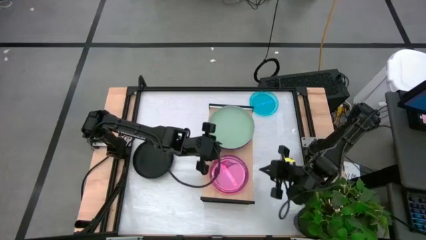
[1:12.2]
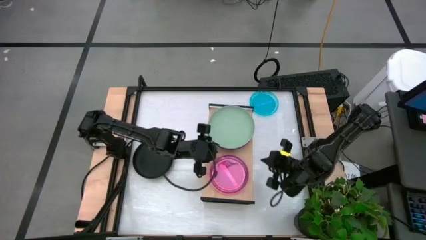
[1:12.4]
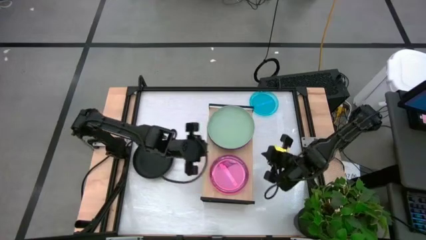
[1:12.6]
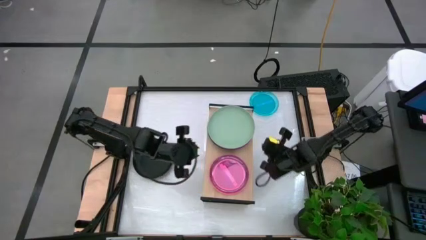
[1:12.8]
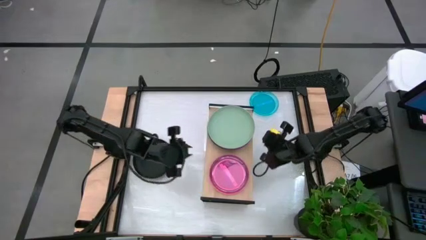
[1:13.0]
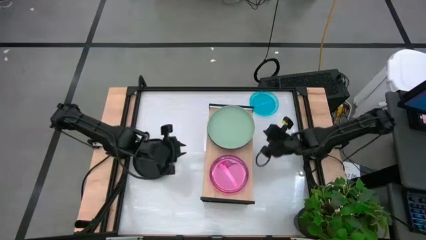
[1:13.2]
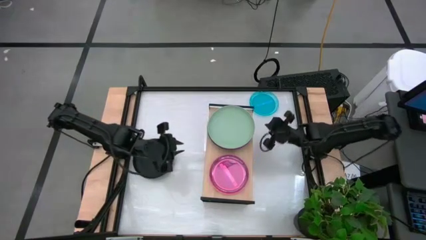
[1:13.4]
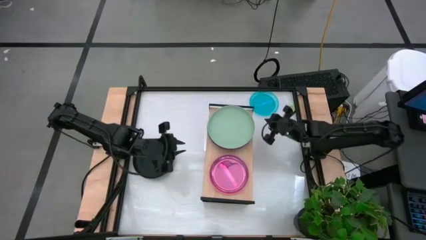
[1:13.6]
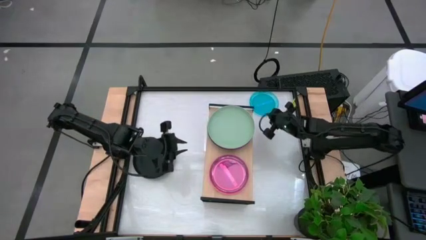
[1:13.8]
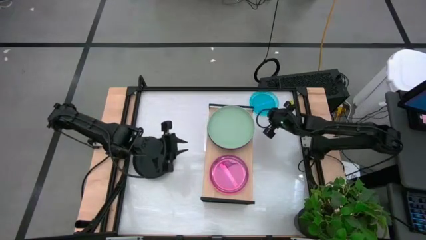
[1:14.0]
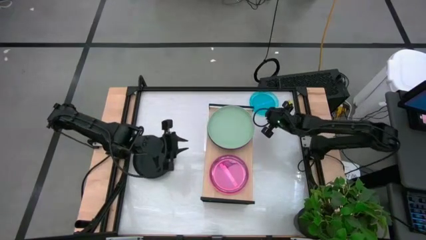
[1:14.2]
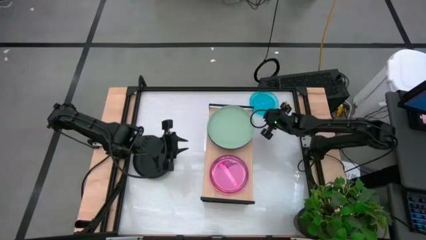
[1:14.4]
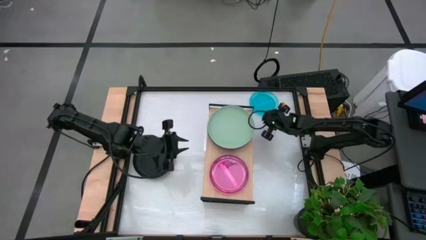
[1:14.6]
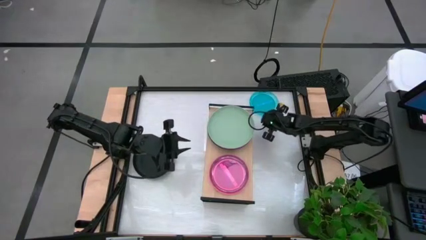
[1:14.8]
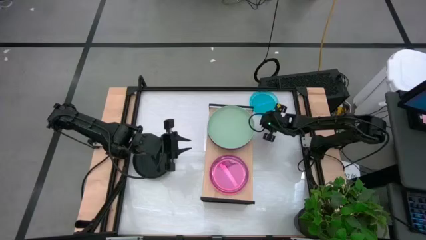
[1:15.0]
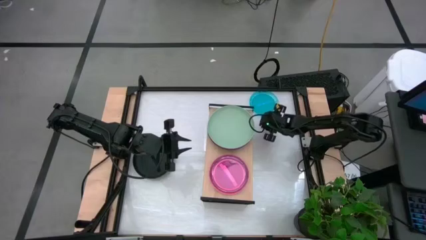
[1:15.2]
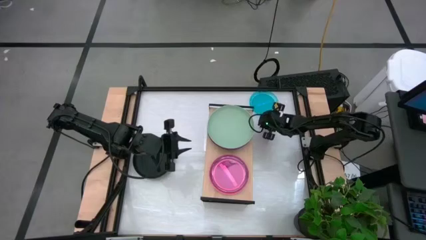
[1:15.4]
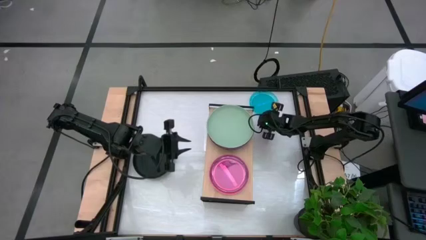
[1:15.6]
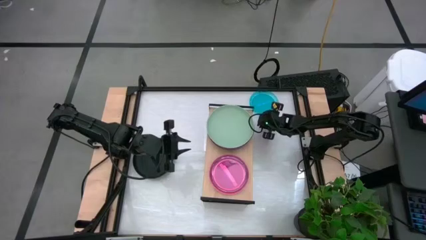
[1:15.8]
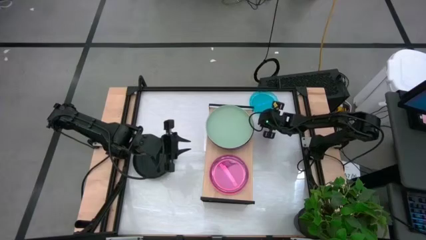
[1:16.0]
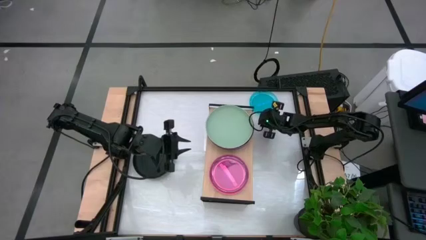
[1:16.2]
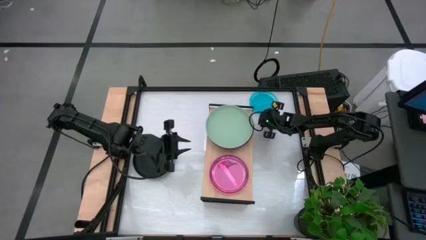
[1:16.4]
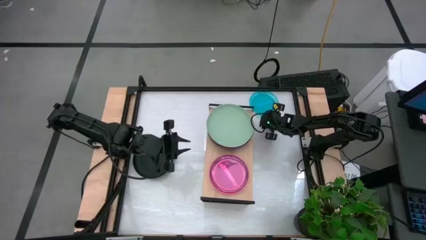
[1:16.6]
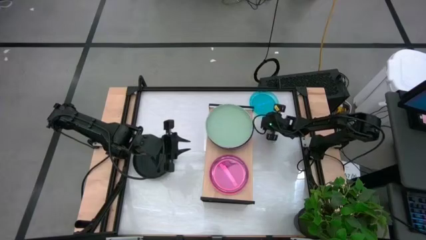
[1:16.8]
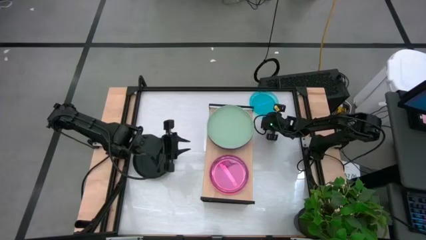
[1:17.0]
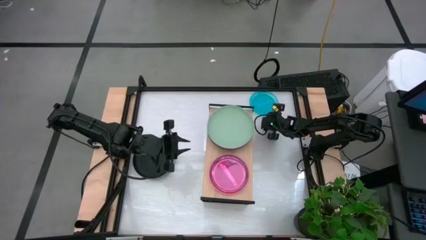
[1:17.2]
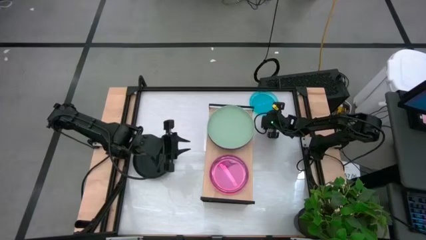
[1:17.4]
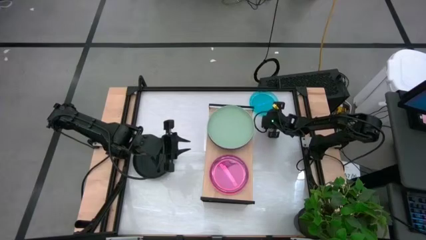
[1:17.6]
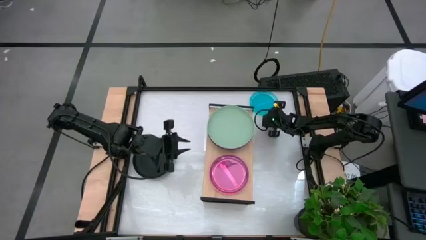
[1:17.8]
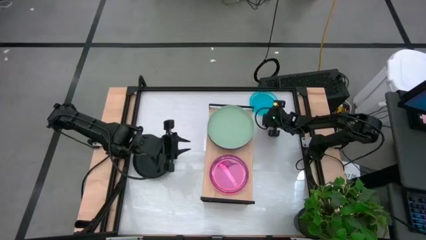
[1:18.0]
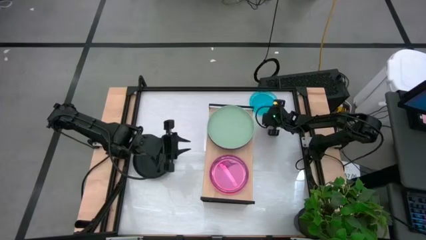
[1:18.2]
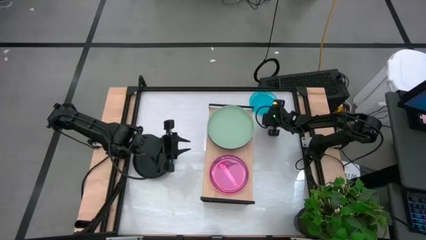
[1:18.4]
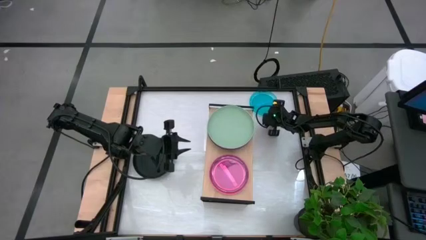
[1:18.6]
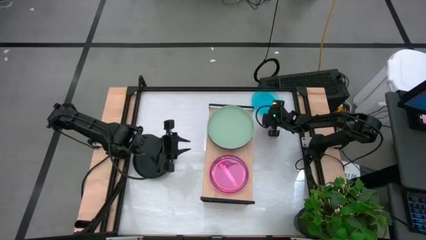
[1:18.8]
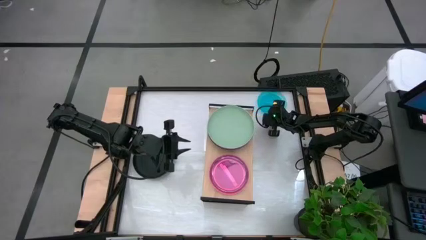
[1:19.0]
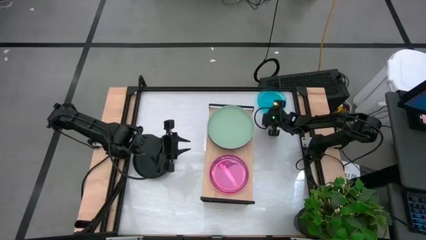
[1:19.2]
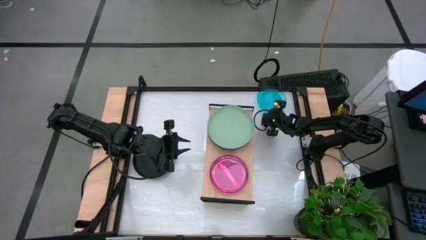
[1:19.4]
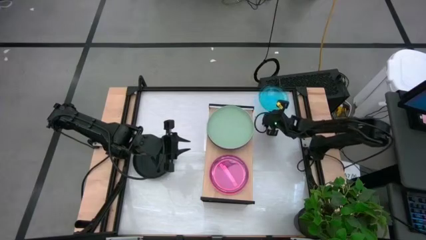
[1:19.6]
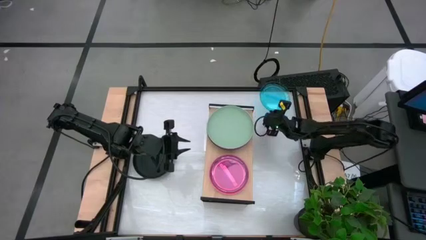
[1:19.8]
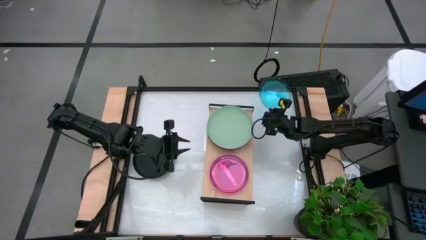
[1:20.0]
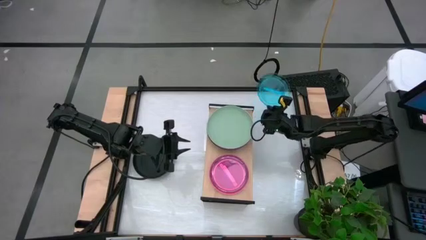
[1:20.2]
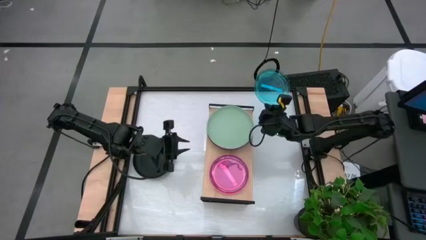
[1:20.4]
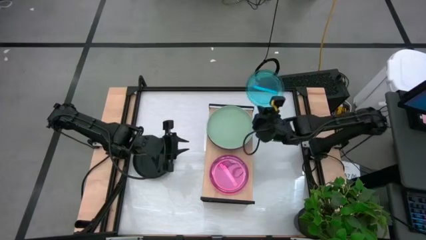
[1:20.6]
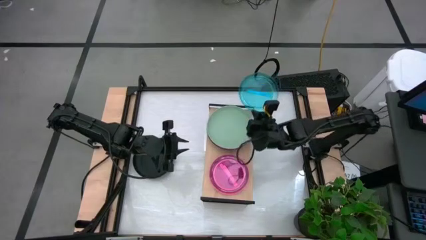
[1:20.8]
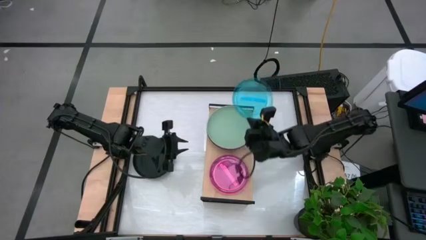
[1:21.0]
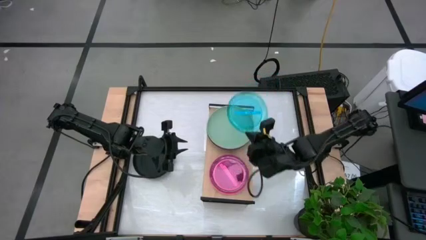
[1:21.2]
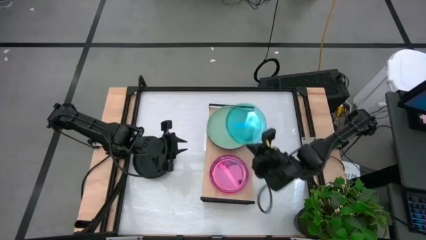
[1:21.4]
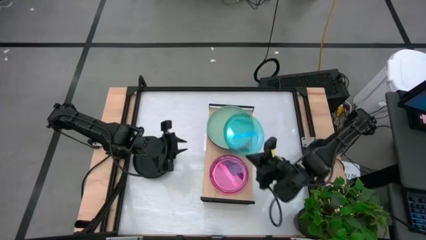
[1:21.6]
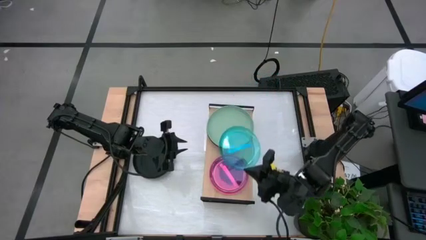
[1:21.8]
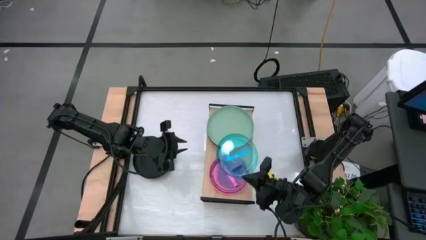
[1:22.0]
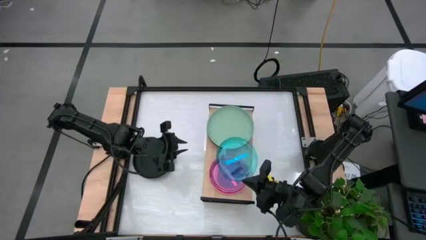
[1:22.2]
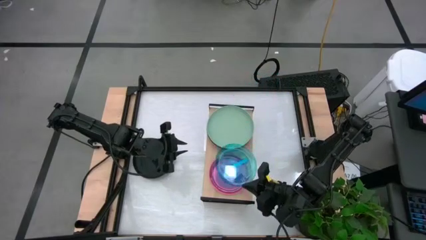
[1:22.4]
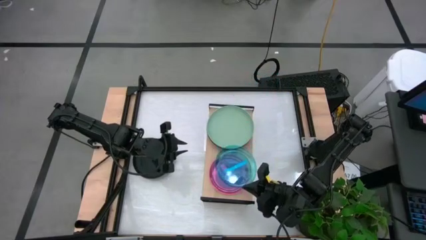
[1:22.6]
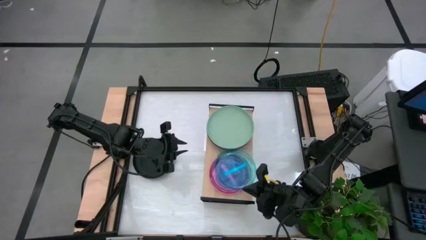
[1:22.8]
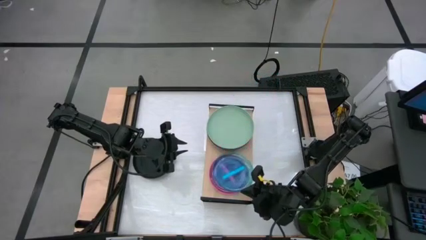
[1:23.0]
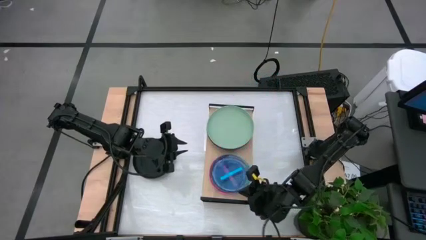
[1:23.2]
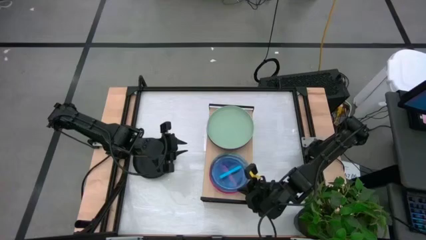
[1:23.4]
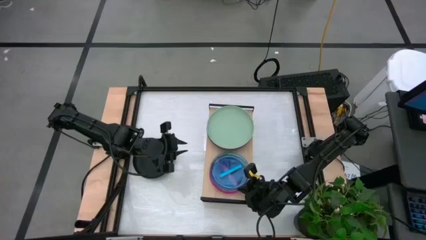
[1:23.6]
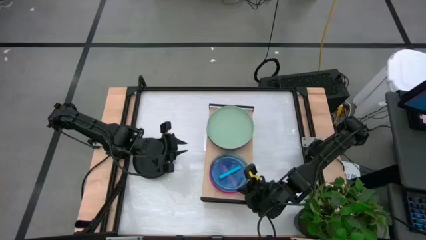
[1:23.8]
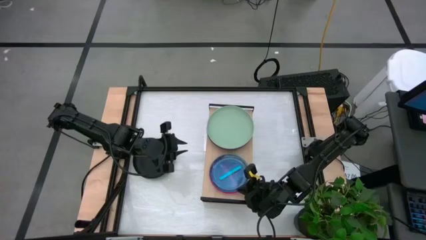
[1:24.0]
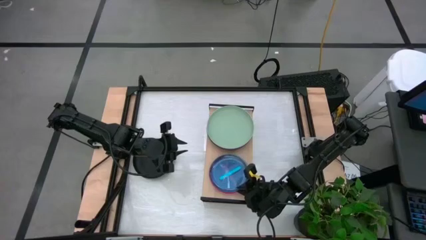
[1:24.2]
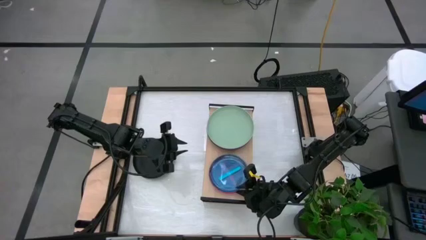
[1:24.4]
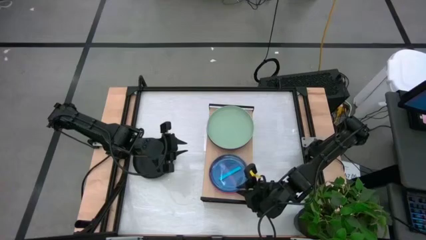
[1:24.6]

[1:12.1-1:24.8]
Task: Place and stack plates onto a shelf
Stack the blue transparent plate on top of the pink transparent plate on the shelf

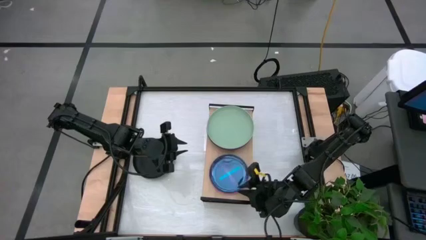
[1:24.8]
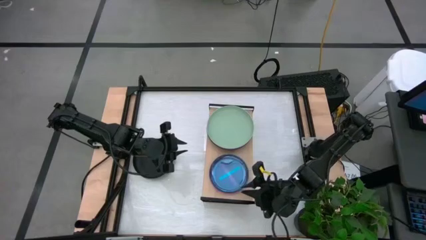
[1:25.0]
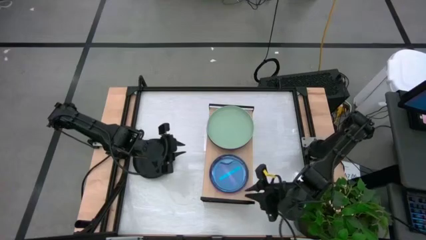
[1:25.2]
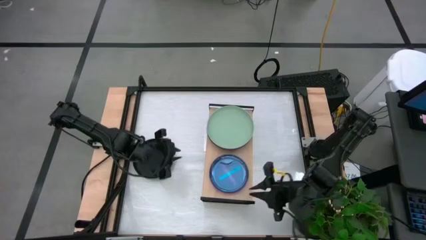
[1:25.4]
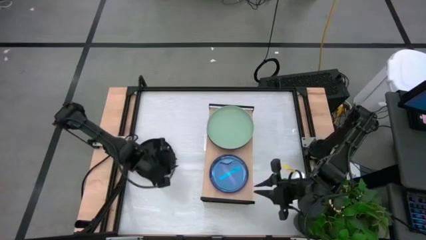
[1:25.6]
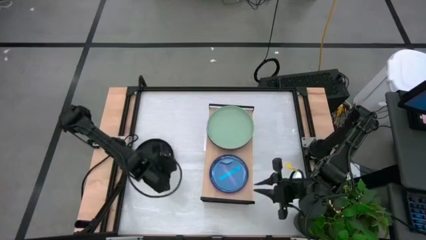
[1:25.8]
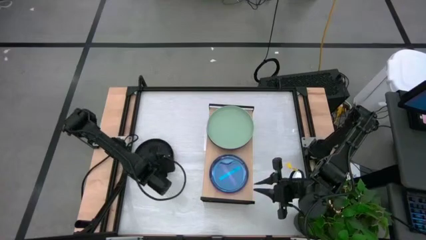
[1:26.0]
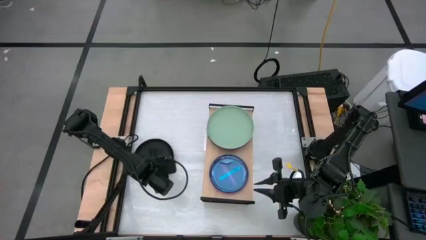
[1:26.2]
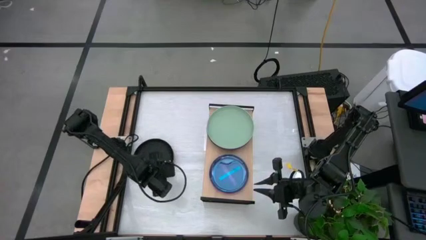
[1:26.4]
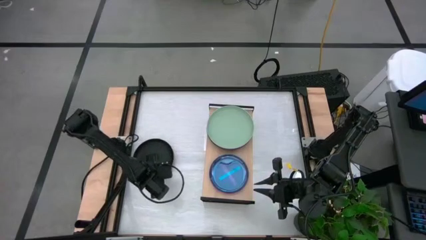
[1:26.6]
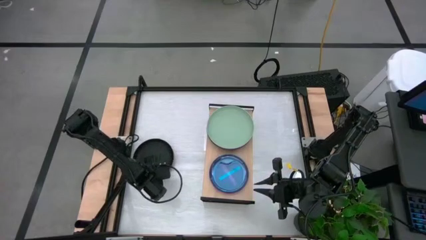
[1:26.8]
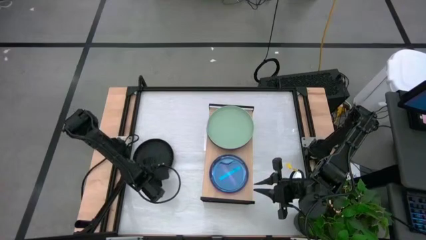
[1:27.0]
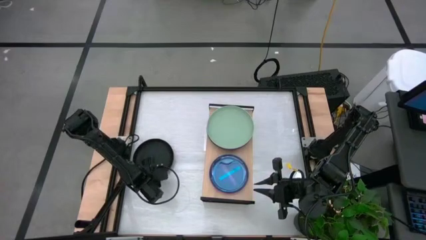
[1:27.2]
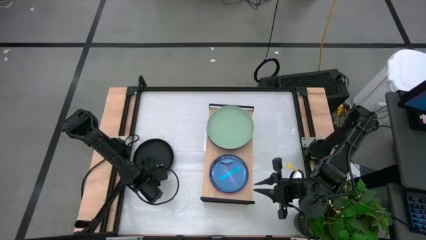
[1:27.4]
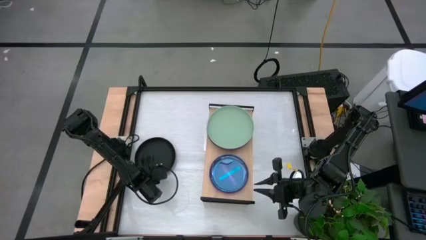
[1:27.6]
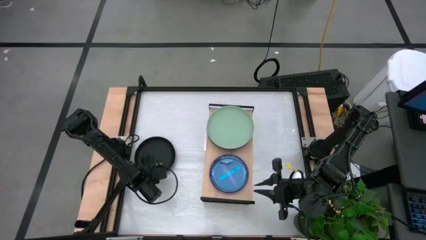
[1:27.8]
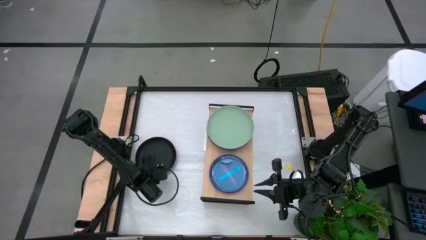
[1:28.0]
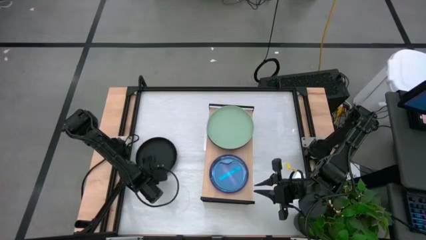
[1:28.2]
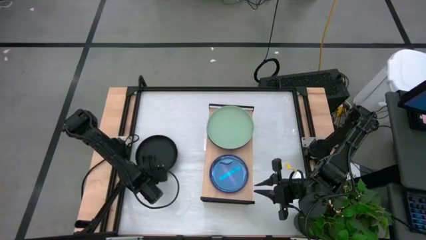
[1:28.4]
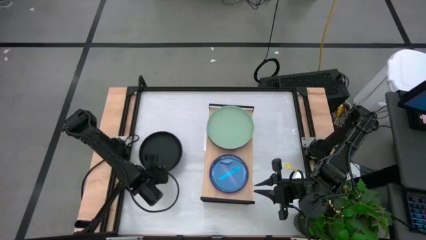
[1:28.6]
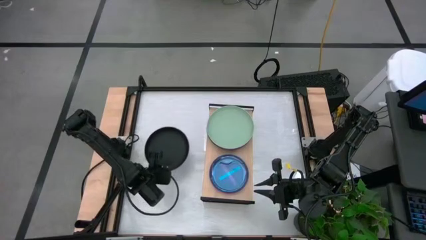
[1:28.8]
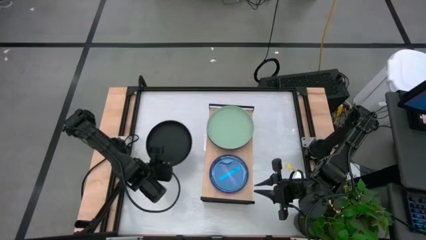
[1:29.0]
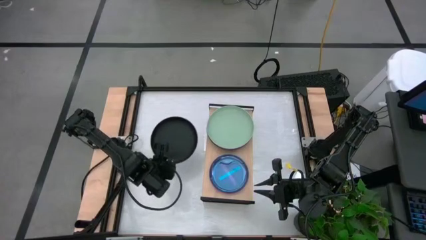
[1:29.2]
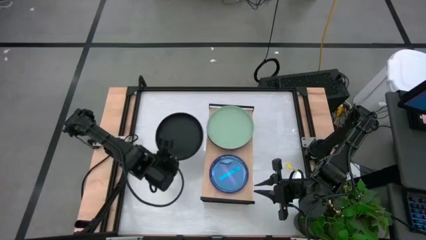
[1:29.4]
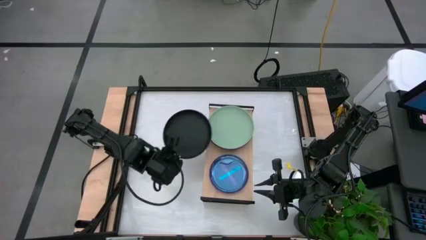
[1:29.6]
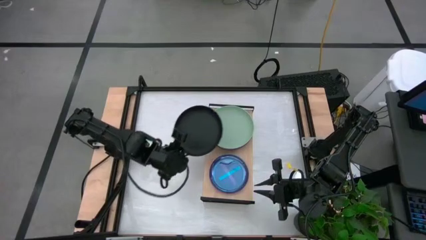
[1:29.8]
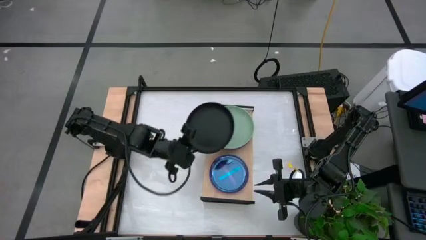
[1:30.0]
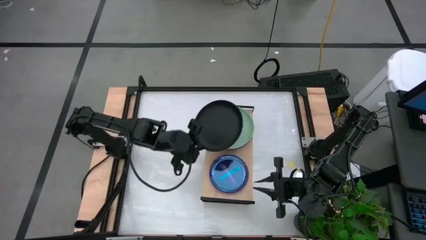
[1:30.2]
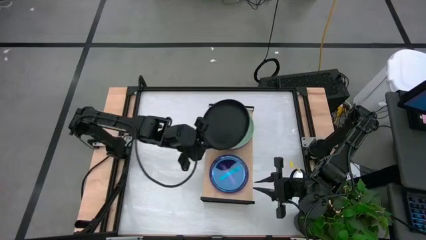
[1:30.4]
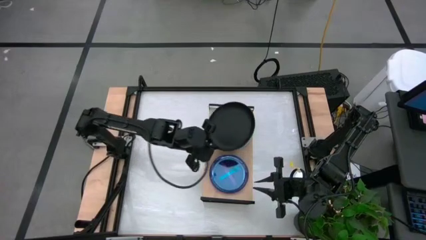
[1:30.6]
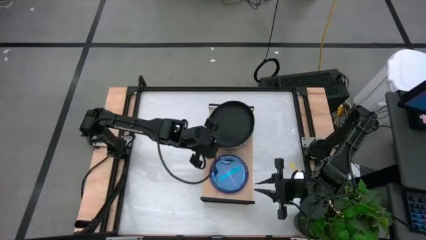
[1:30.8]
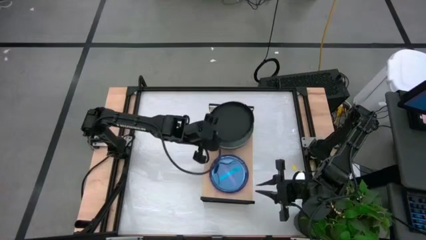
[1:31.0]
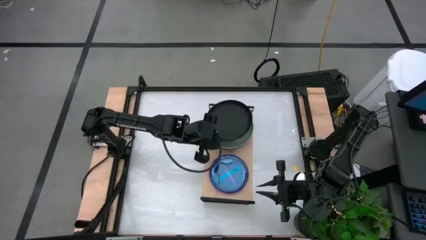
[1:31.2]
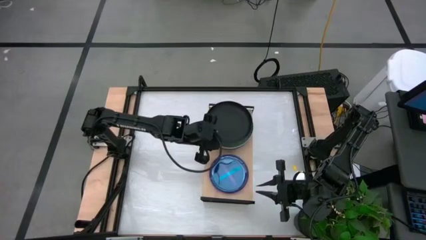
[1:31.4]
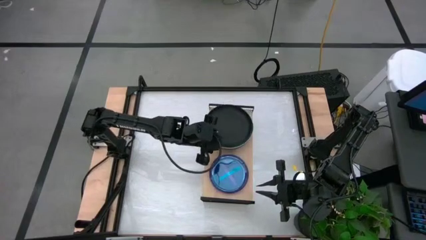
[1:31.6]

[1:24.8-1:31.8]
Stack the black plate on top of the light green plate on the shelf
